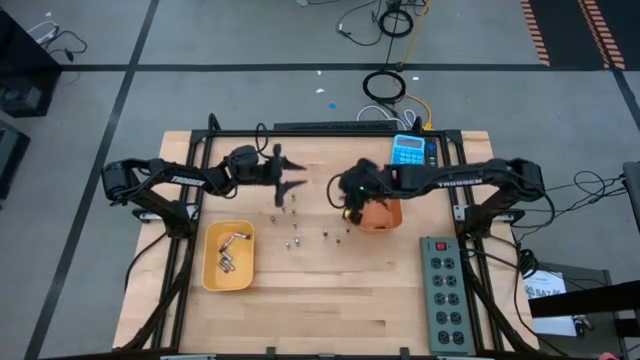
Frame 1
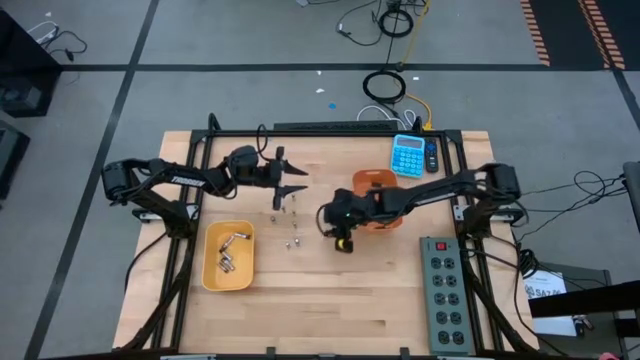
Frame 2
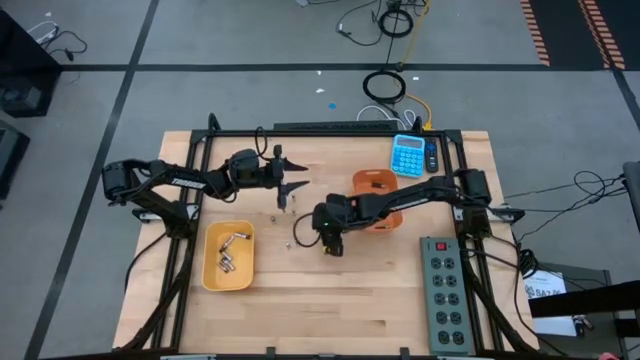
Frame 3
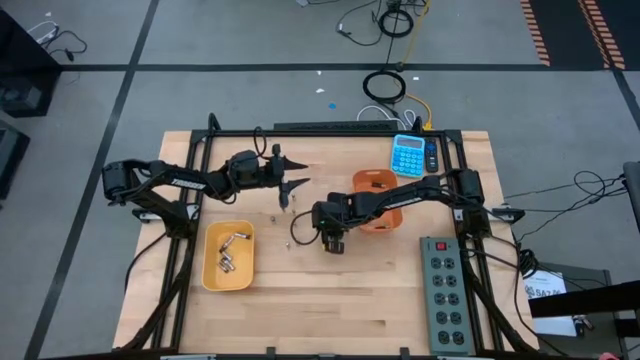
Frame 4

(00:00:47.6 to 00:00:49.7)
Task: Sort batteries
Put the black brown battery into the orange bin

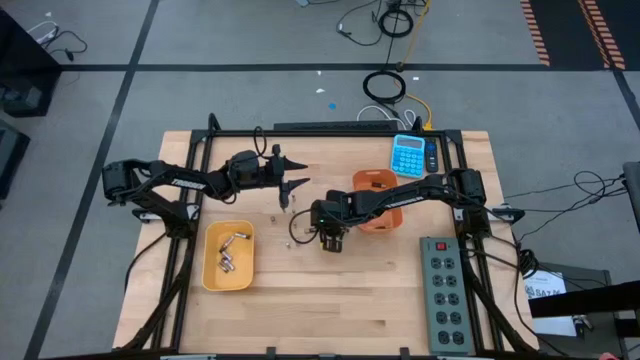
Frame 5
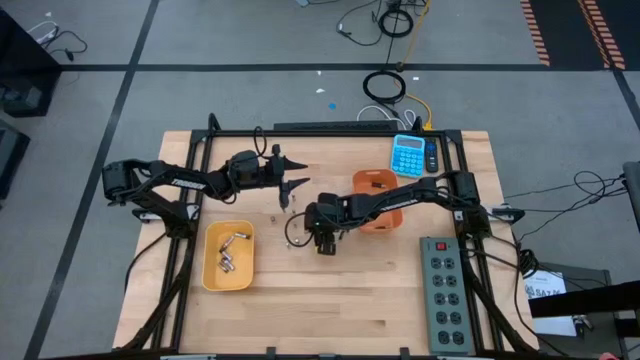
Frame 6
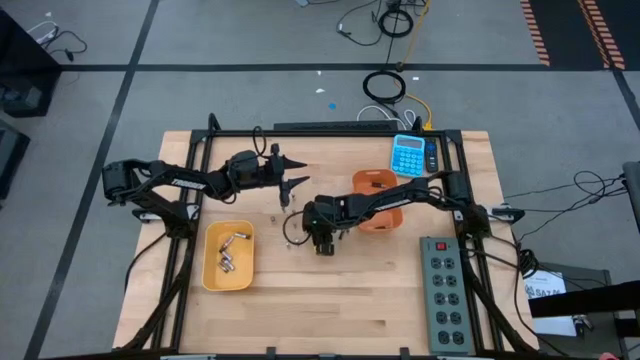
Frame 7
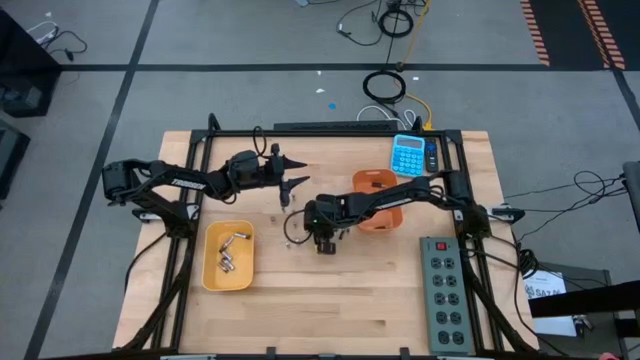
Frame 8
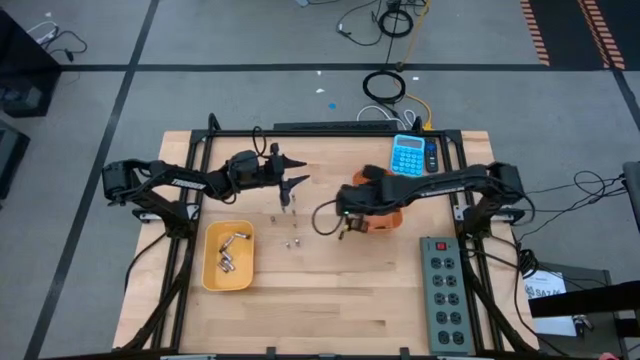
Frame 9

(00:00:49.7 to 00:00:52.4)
Put the black brown battery into the orange bin

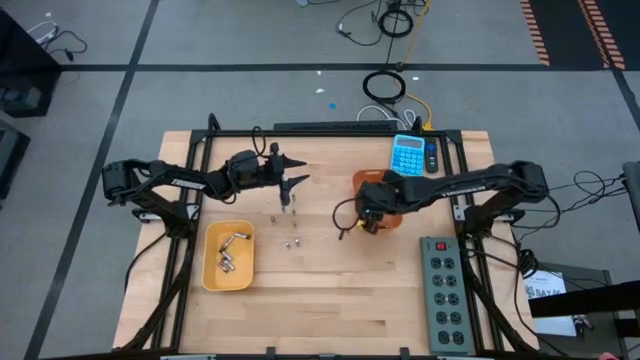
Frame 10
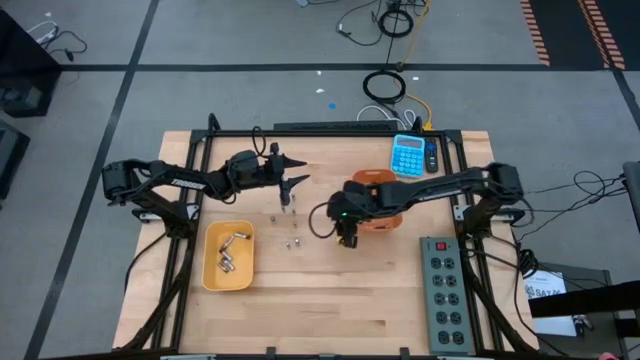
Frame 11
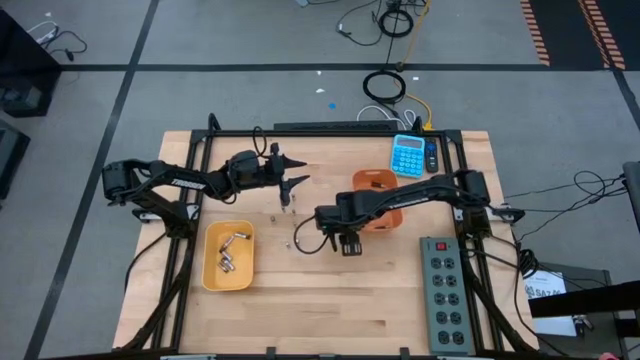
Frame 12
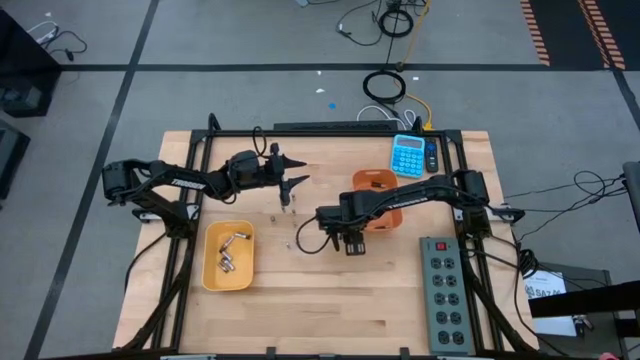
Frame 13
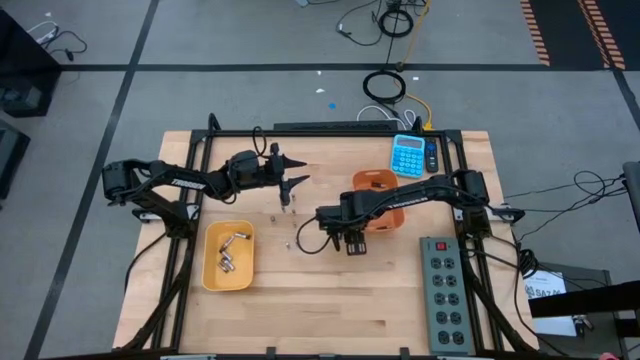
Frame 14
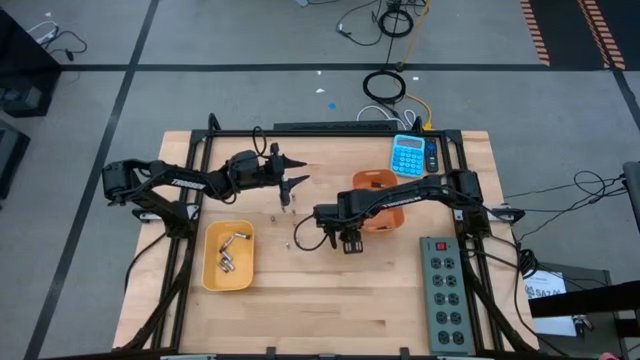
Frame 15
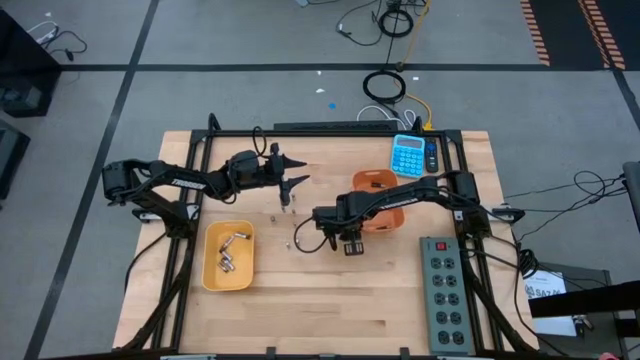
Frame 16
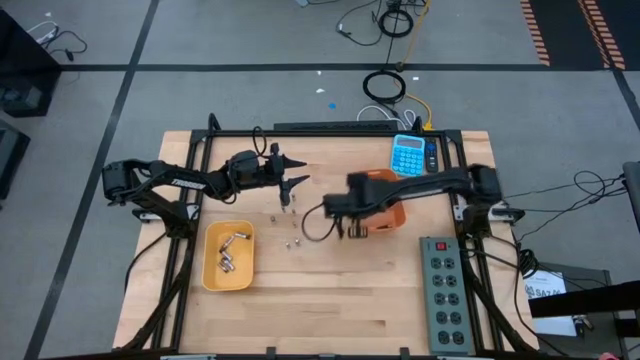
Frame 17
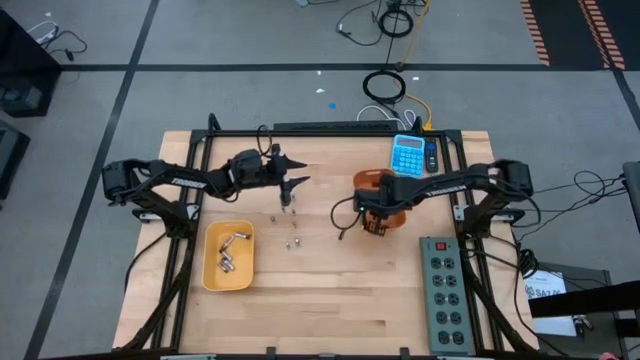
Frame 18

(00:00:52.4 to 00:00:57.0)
Put the black brown battery into the orange bin

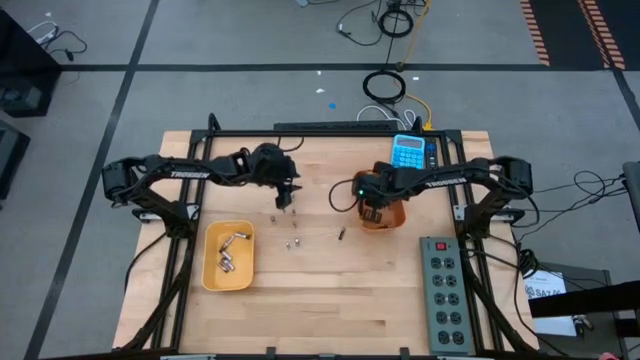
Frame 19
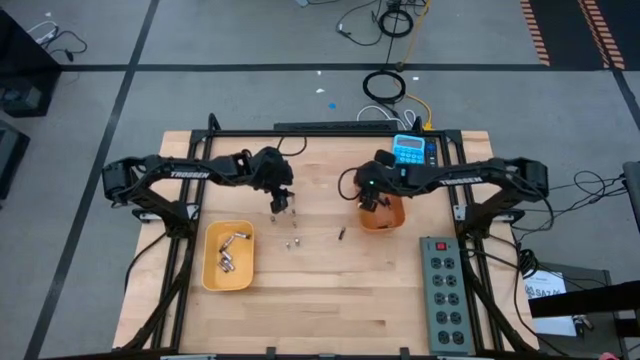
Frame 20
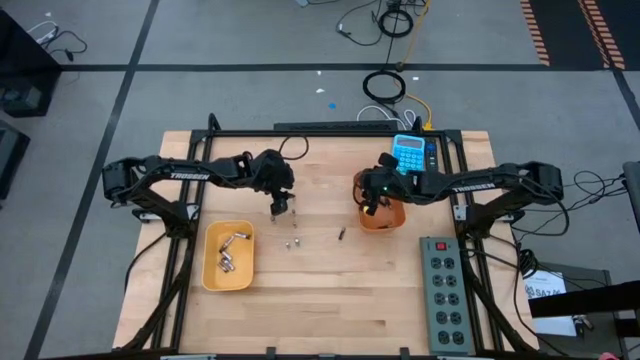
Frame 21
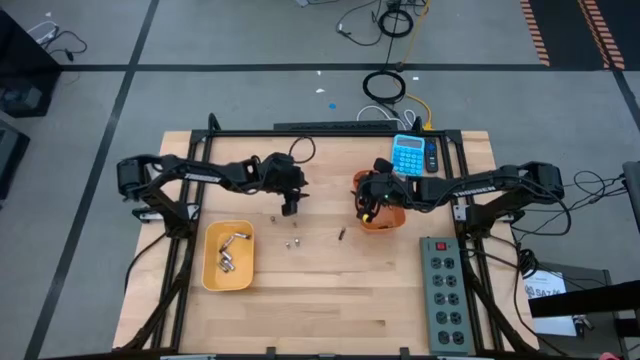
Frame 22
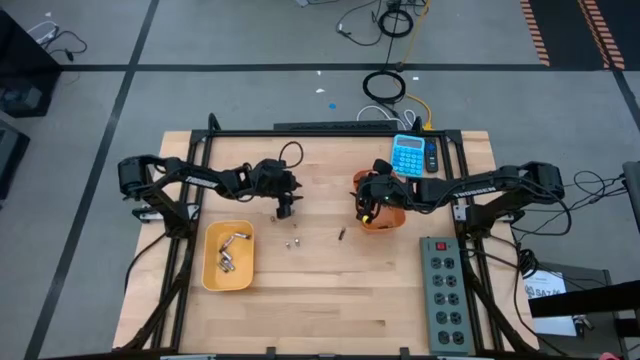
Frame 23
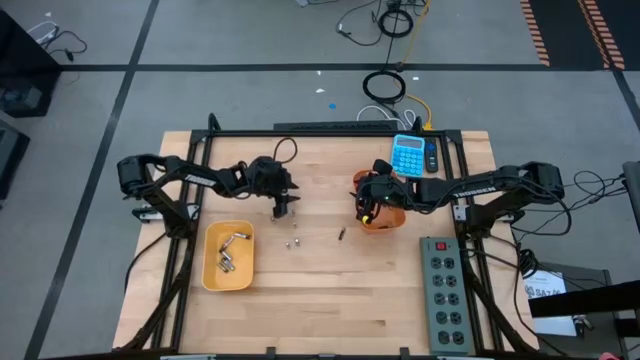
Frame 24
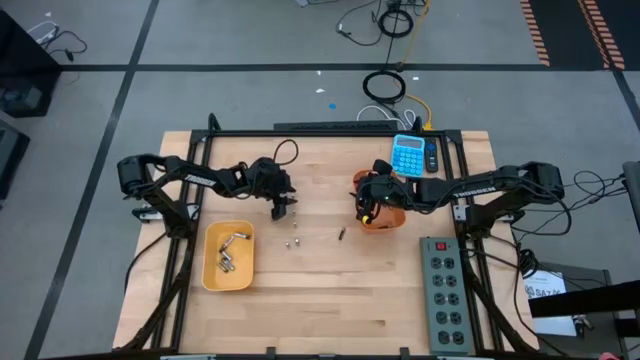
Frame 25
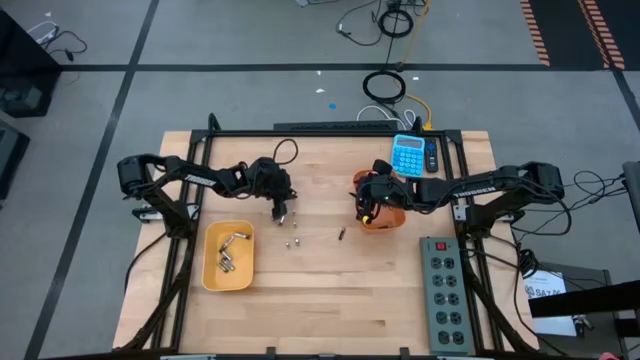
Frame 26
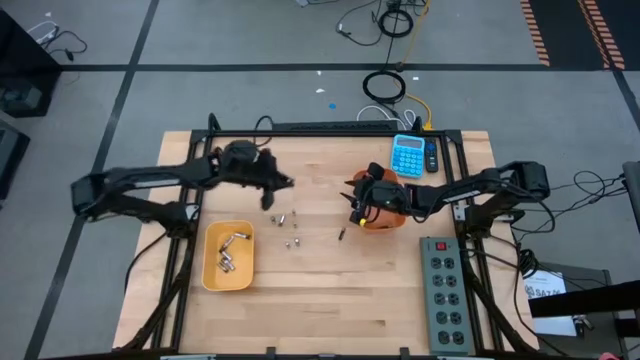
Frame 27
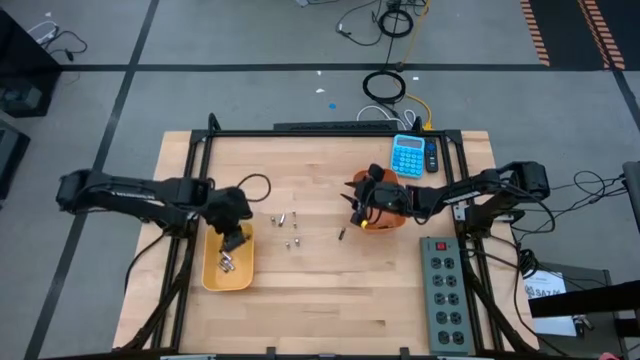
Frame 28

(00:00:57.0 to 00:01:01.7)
Put the silver black battery into the yellow bin

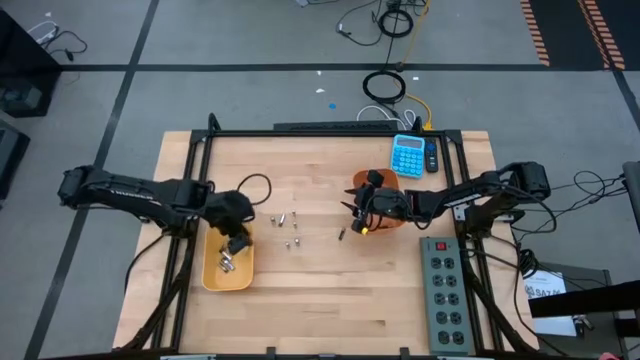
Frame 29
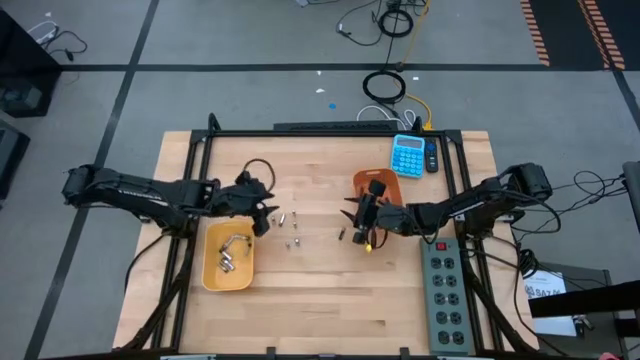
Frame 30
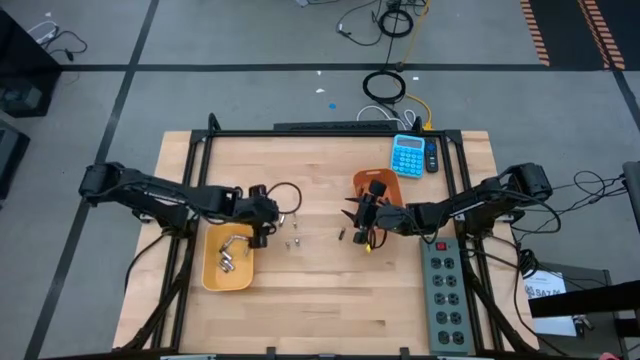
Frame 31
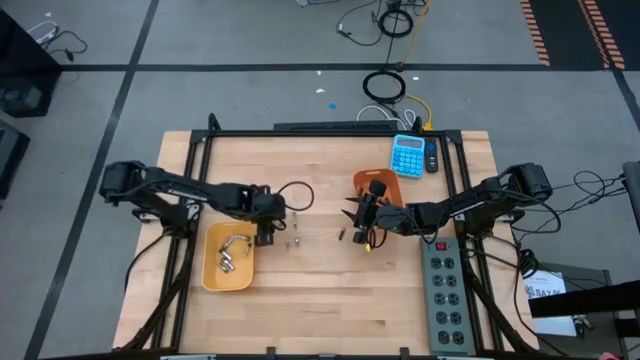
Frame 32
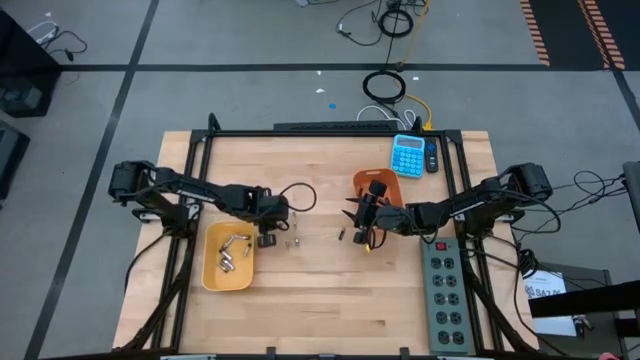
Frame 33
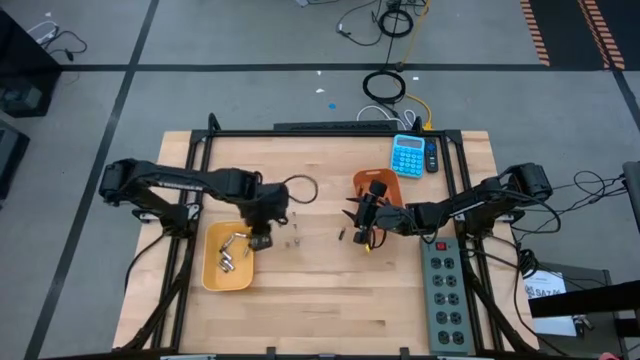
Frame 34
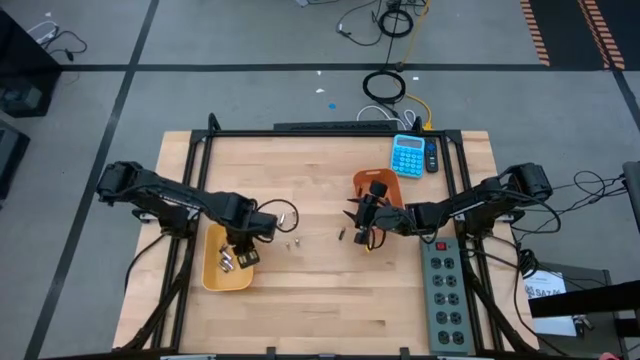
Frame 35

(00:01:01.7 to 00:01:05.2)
Put the silver black battery into the yellow bin

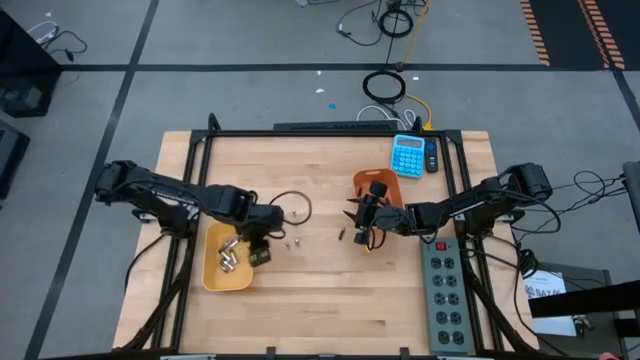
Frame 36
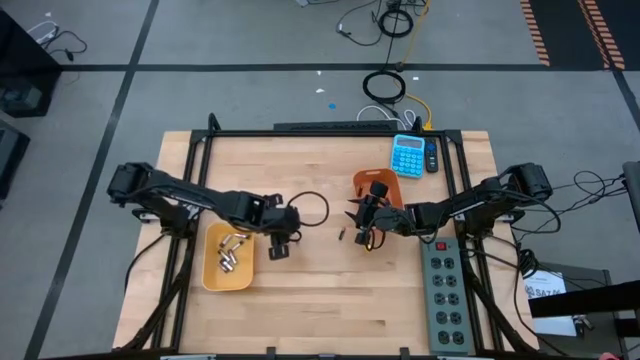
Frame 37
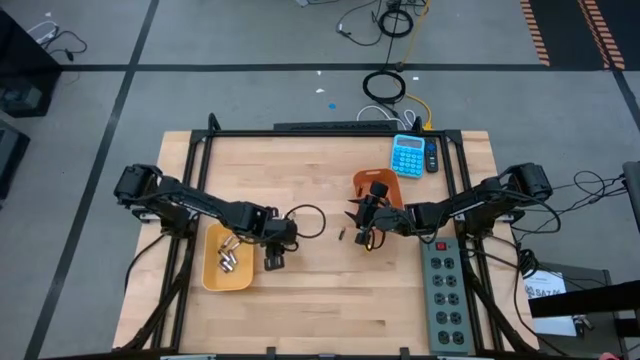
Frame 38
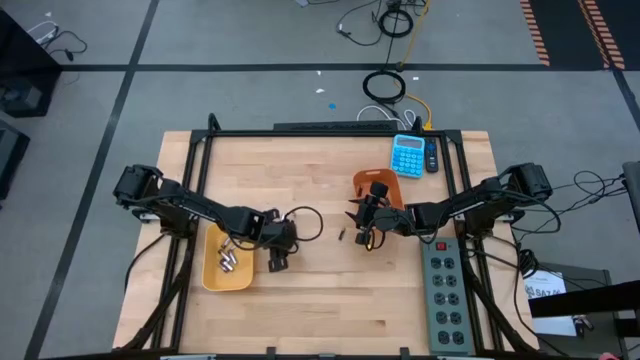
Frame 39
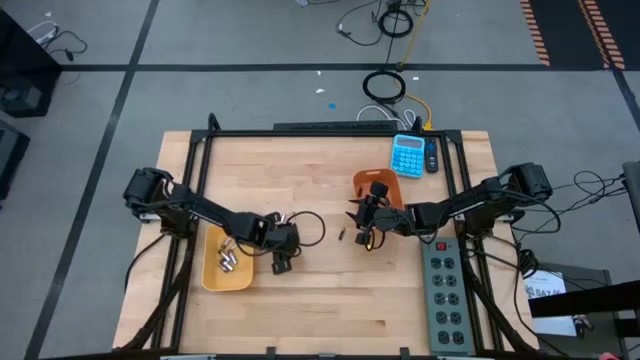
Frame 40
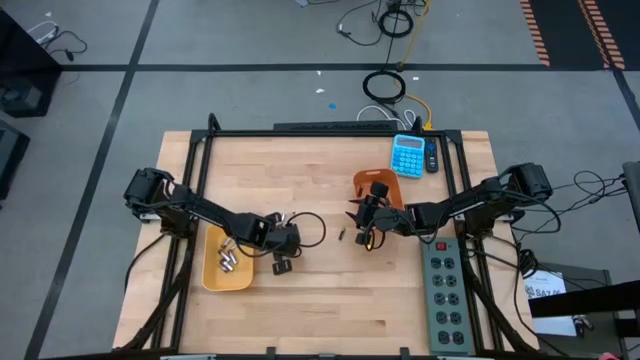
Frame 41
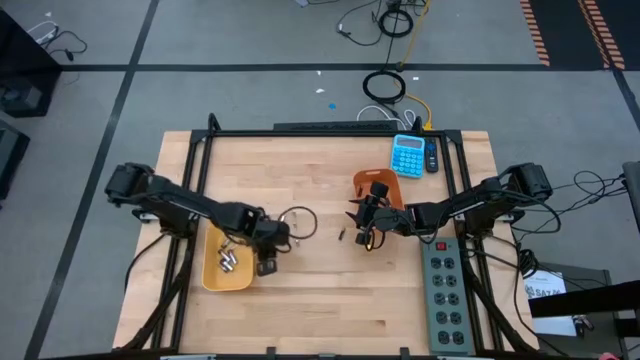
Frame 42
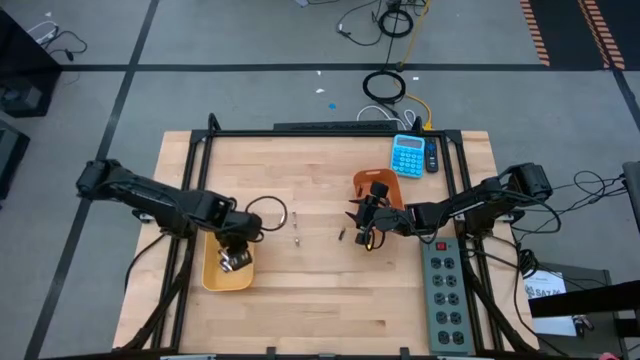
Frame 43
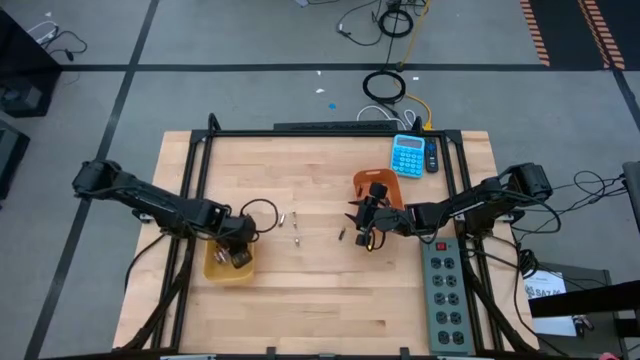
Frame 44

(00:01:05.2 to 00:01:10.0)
Put the silver black battery into the yellow bin
